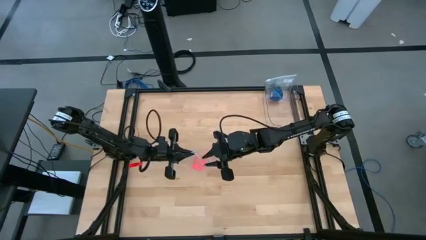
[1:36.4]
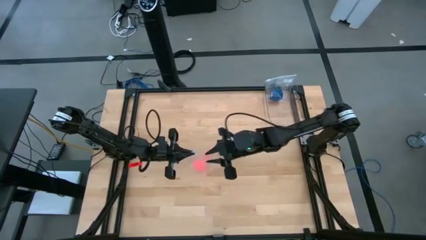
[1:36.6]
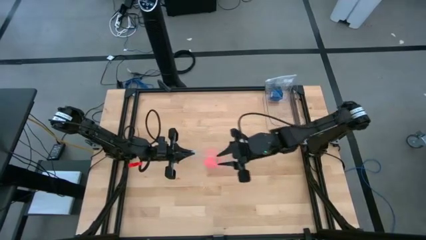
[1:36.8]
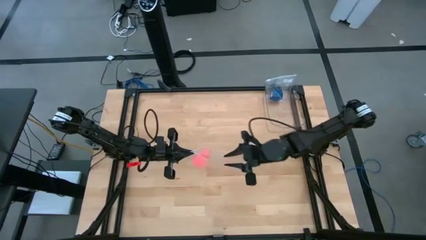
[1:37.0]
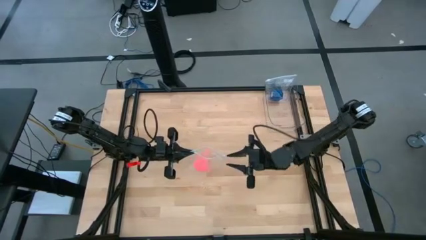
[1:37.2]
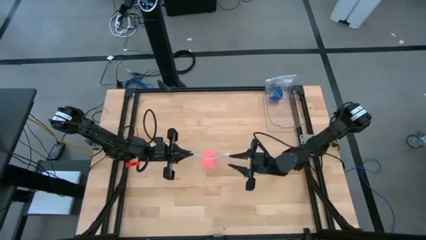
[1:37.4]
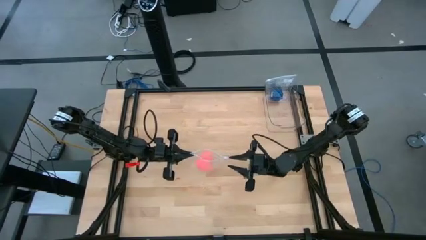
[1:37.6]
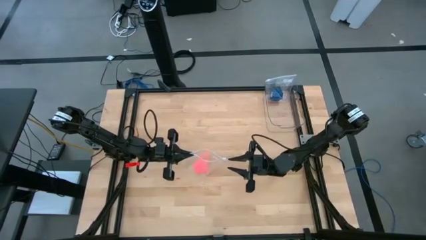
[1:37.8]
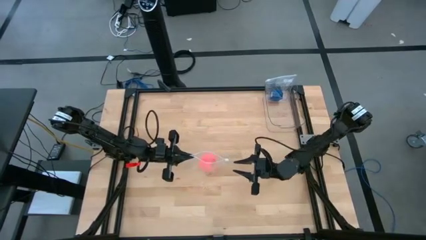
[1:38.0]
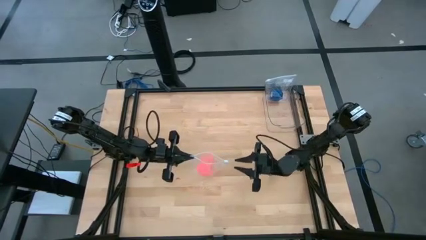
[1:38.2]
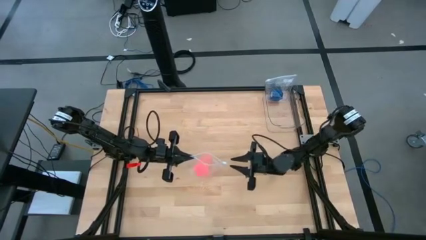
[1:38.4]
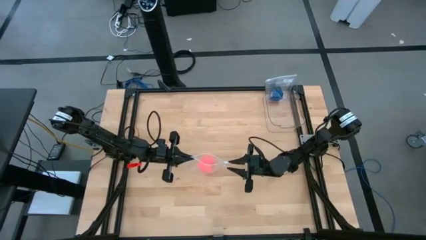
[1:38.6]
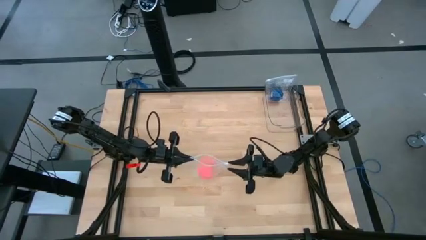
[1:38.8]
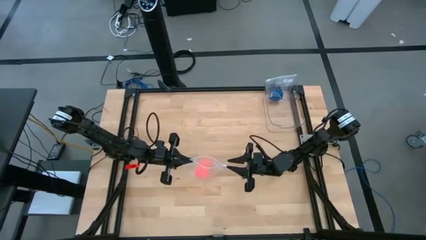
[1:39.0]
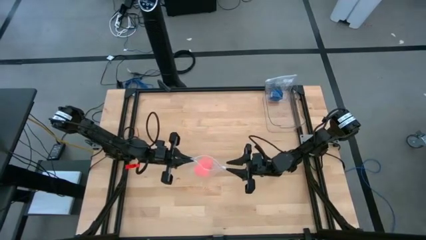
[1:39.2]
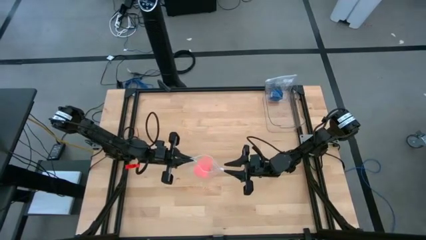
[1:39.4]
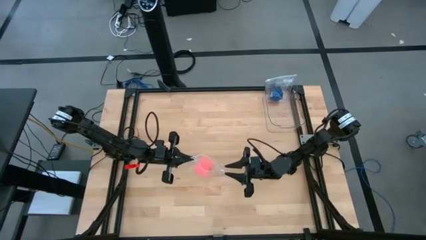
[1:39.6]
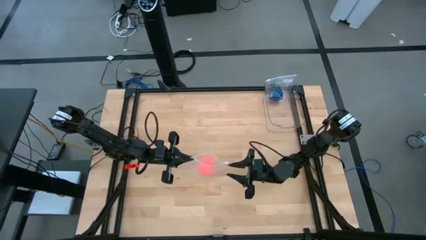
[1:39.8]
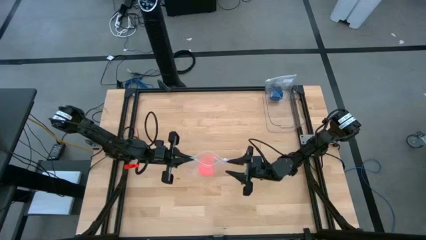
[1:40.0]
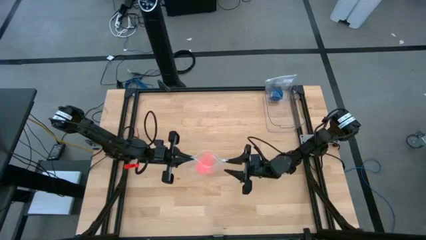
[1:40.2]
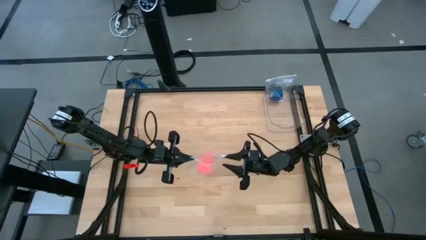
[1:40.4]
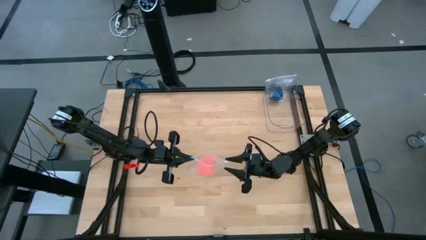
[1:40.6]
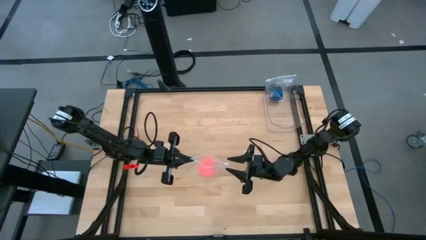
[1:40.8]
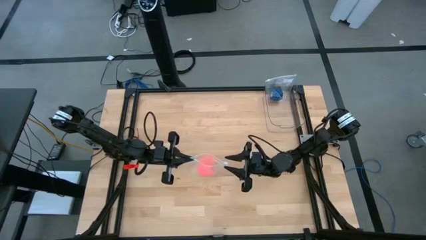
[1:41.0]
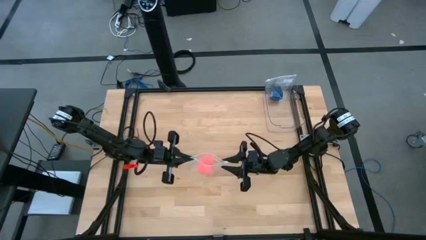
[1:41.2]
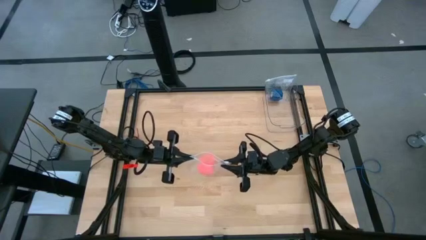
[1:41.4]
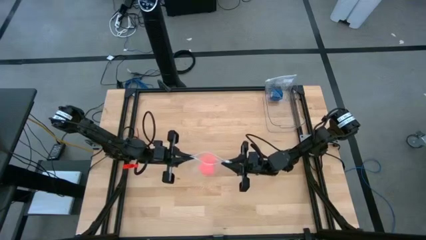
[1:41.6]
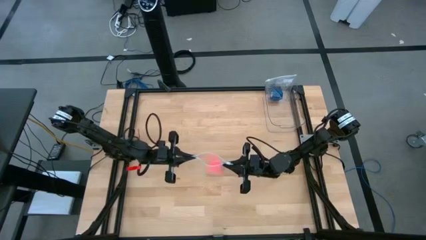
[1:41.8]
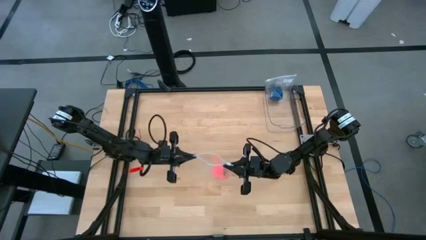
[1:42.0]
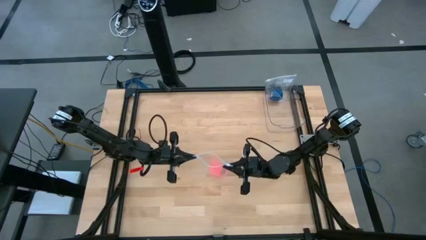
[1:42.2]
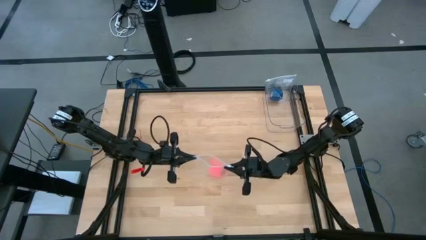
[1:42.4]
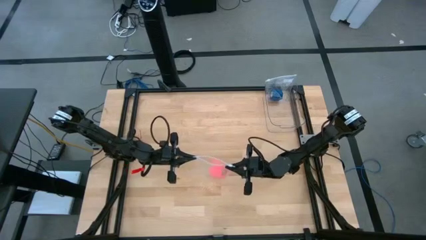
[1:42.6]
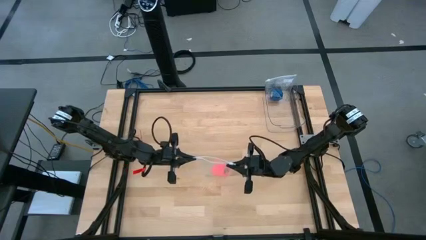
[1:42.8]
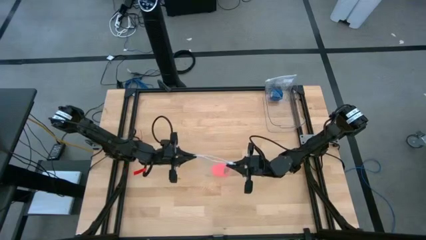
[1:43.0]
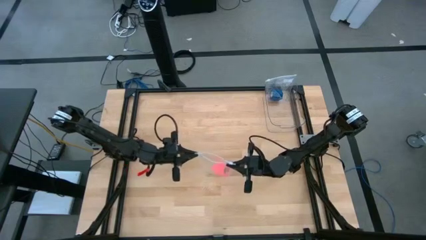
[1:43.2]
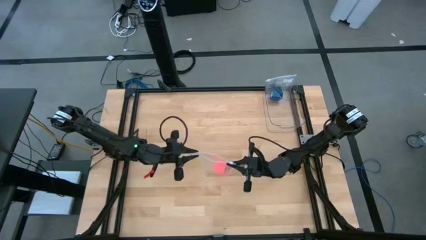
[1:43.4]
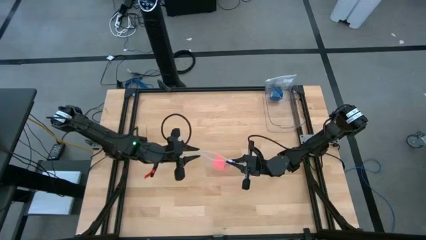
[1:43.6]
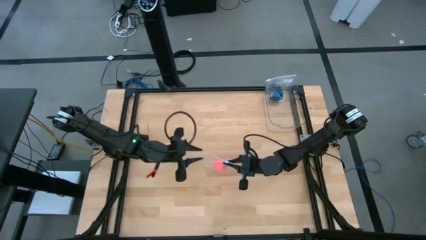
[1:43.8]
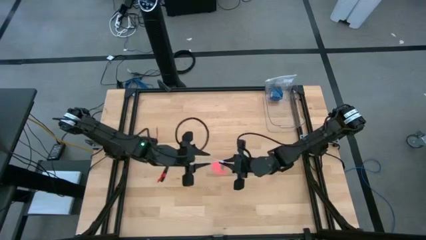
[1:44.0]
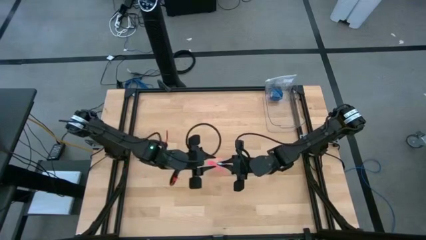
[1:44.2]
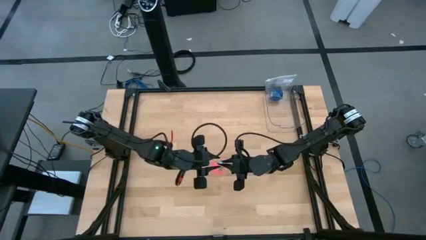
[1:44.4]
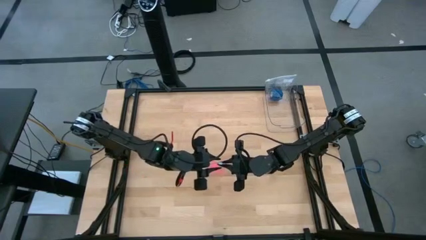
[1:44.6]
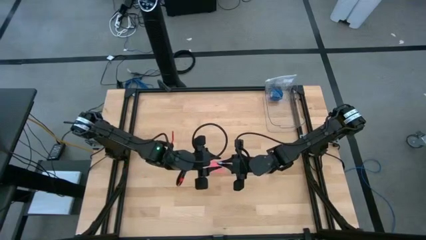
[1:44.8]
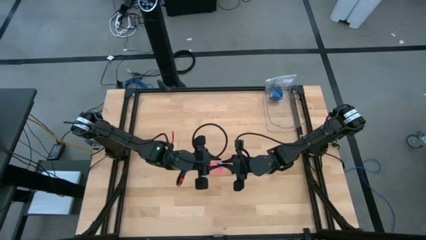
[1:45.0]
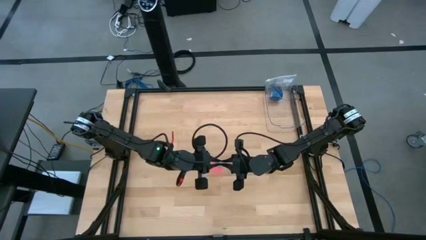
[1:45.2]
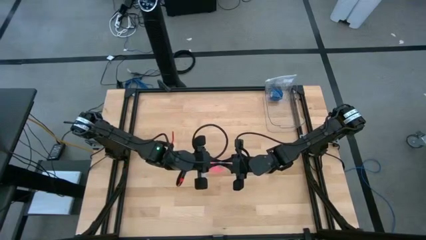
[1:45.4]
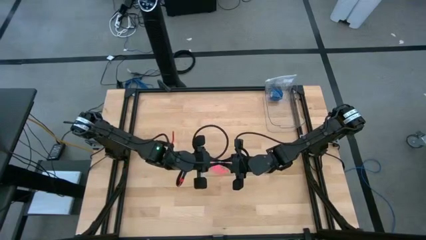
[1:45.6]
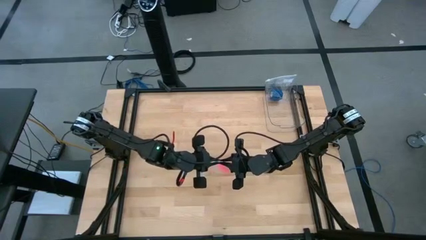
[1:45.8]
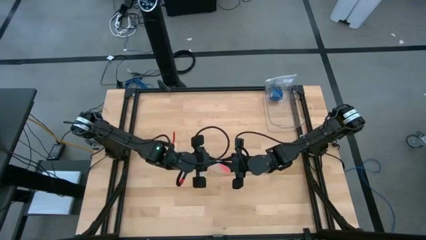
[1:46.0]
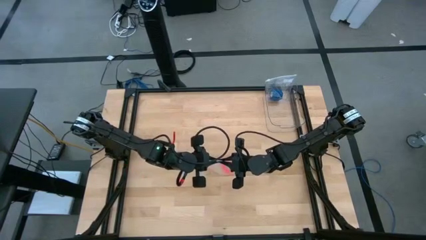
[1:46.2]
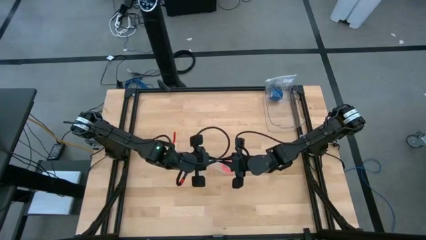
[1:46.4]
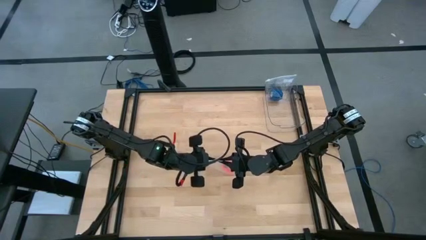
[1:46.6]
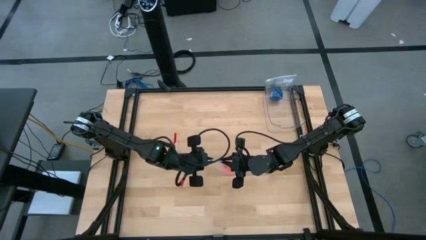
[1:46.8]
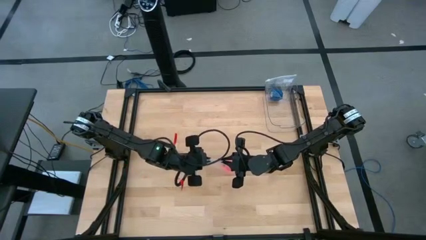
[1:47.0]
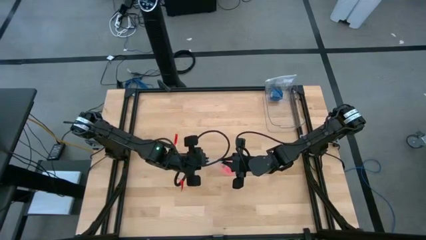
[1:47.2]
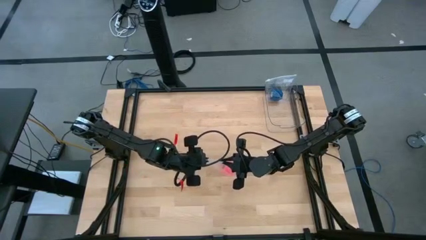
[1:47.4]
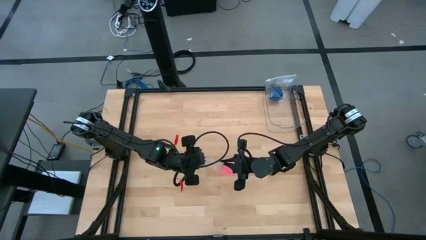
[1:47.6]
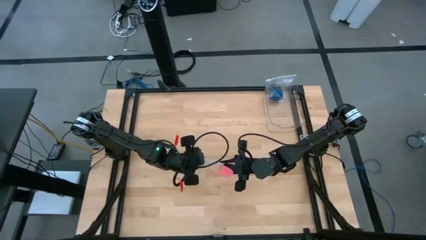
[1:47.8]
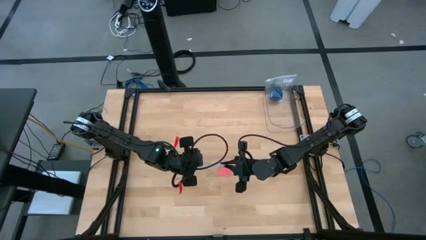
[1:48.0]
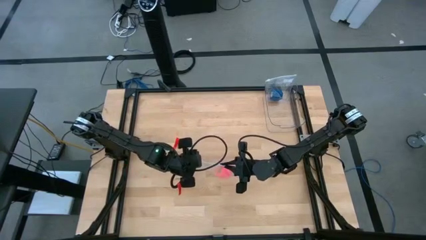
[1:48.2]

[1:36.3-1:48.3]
Task: Roll bandage
Close the transparent zip bag

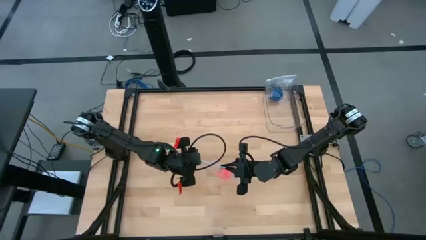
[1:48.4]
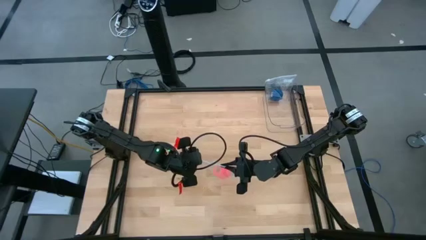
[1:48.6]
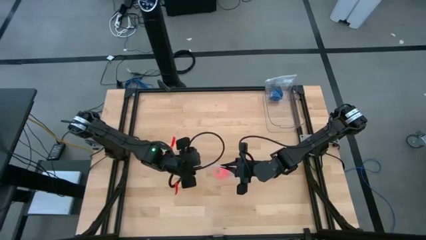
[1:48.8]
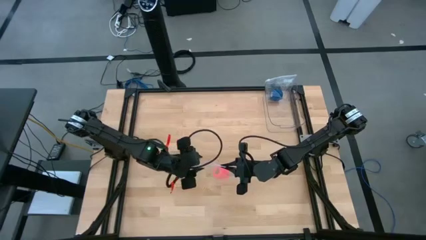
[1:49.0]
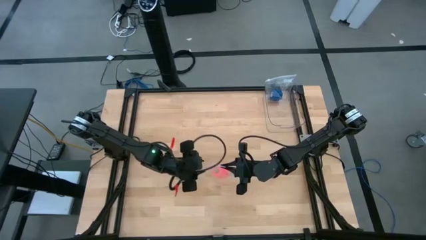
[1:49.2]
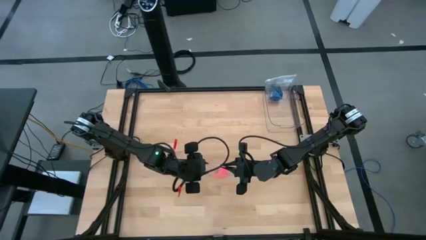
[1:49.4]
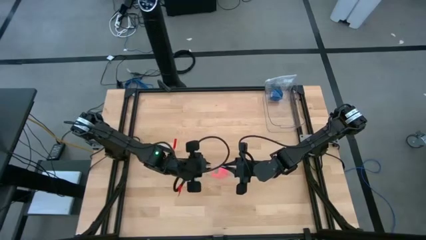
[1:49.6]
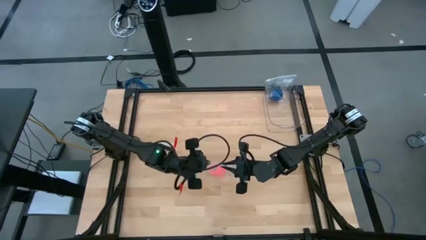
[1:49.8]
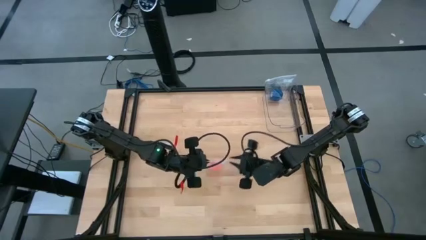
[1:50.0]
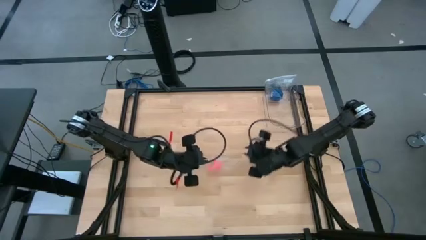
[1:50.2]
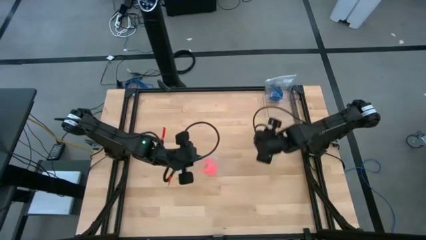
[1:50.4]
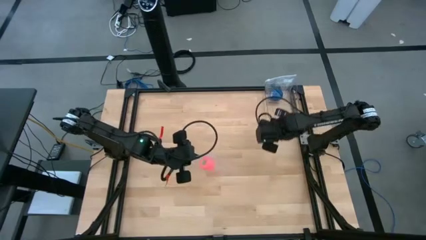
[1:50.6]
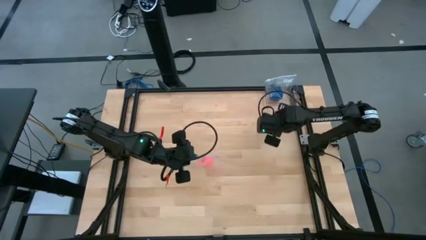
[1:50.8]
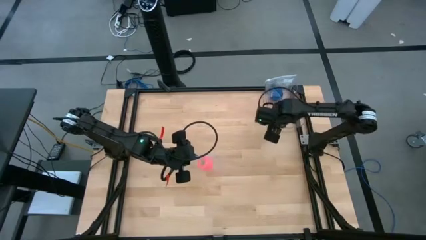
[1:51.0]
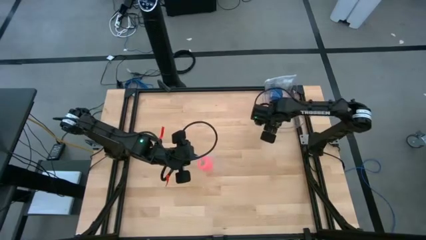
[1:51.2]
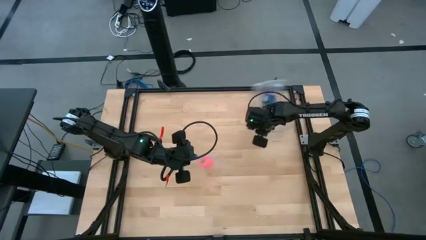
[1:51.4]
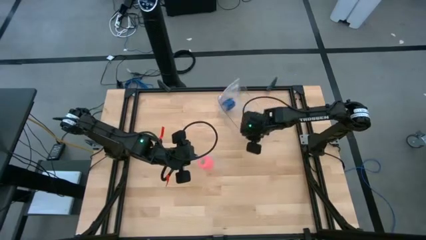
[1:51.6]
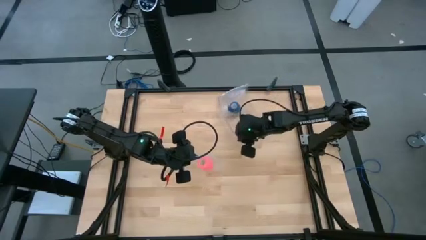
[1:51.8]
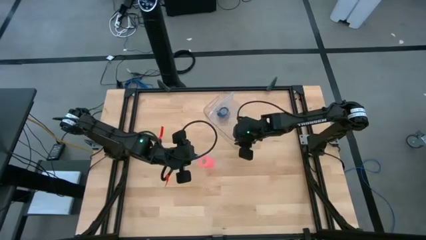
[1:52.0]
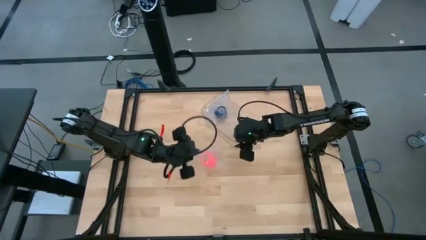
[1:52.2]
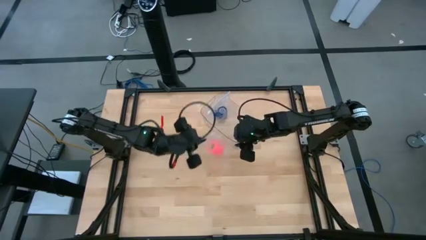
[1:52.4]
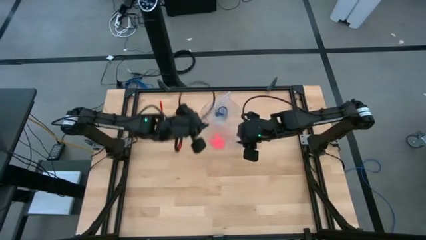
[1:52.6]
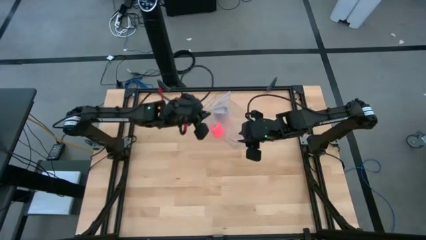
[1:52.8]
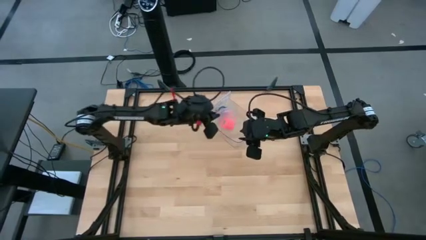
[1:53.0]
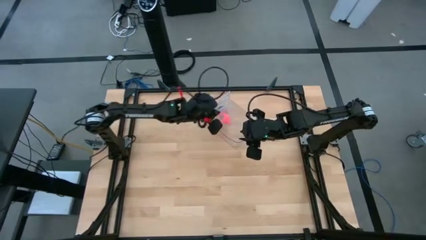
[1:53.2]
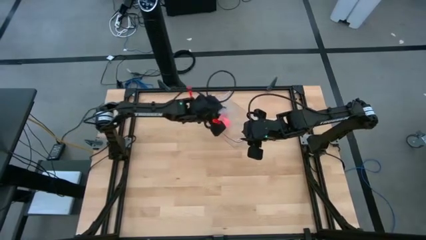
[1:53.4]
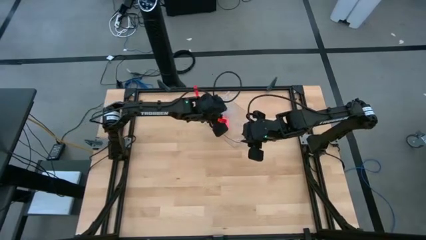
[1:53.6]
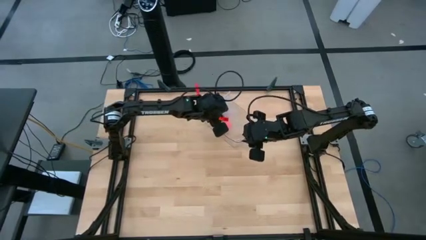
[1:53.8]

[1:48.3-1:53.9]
Put the packed rolled pink bandage into the transparent bin
